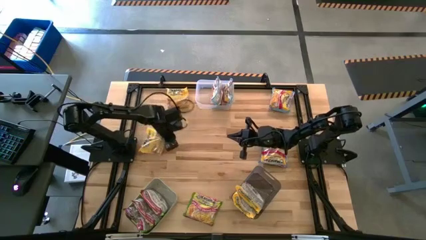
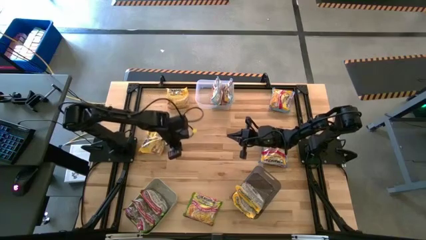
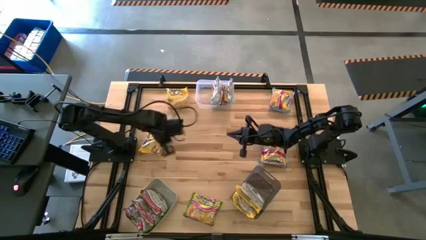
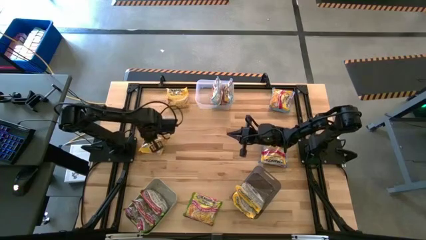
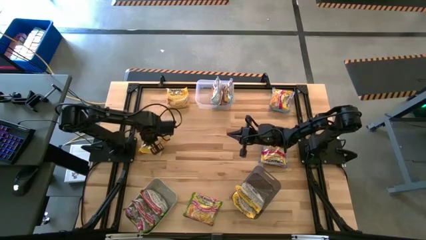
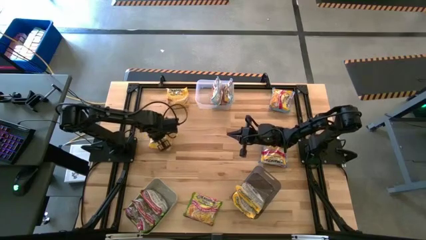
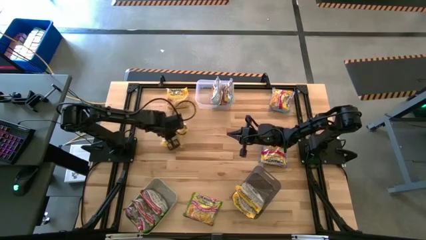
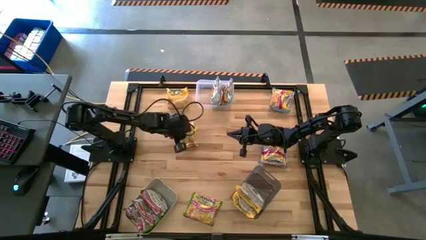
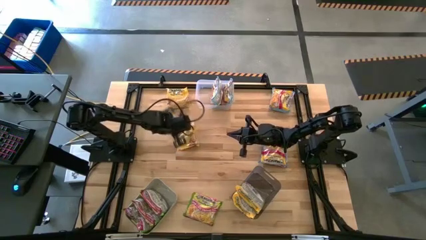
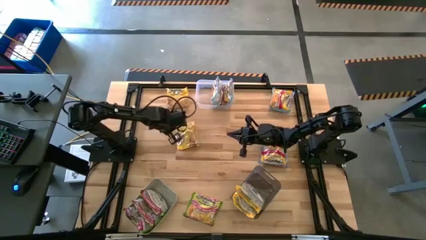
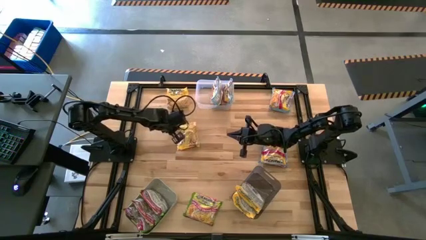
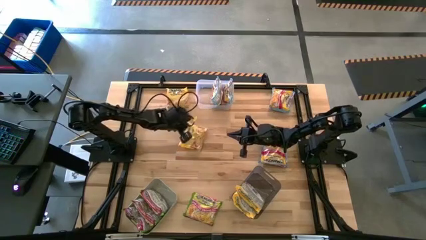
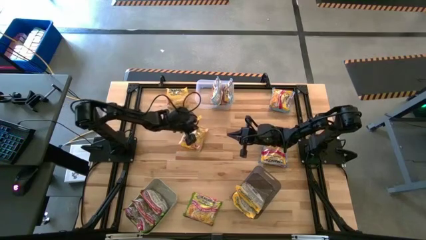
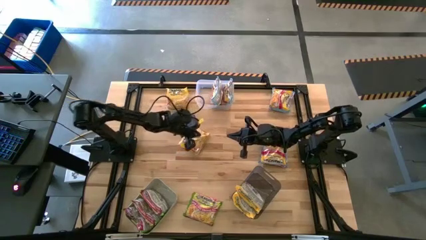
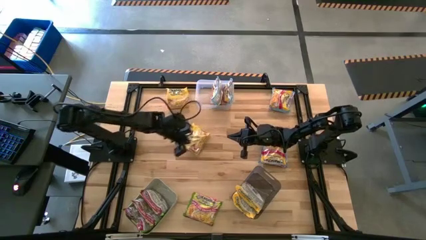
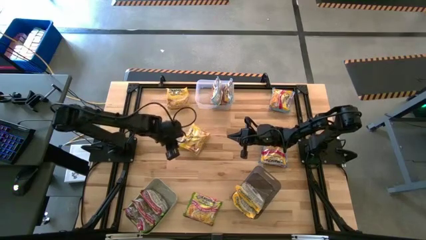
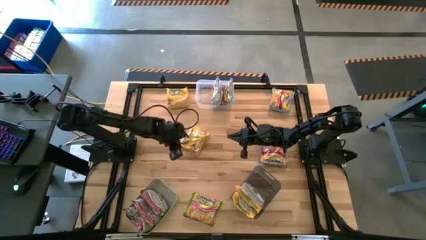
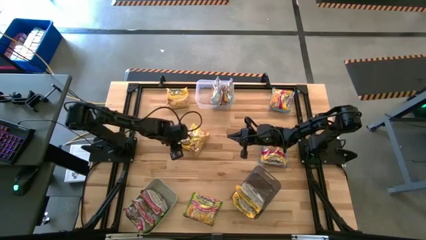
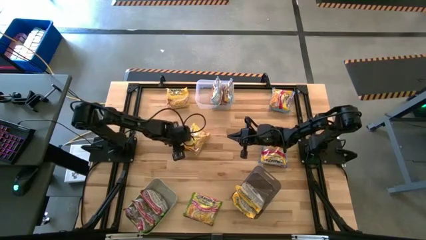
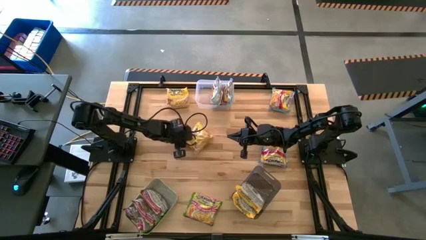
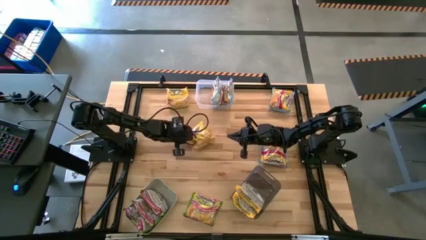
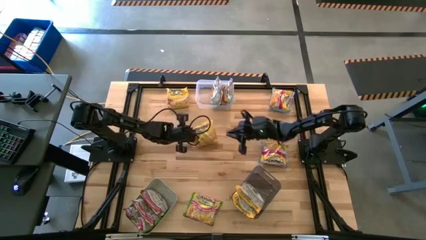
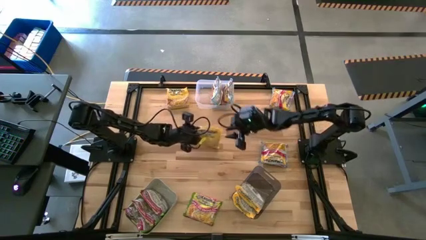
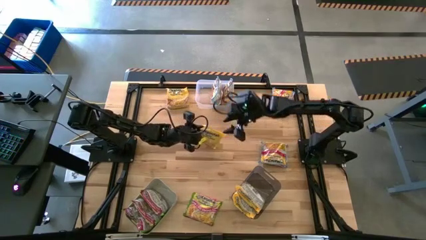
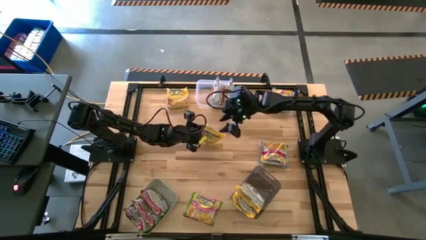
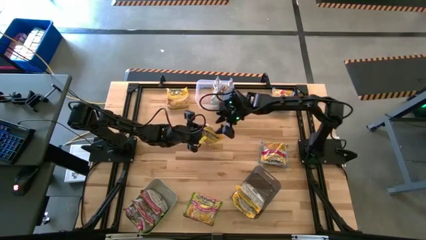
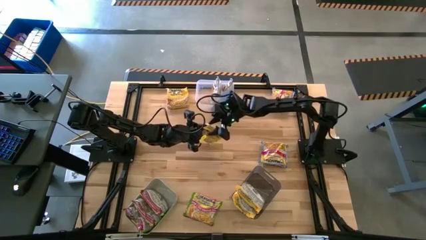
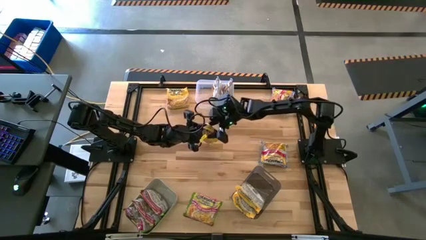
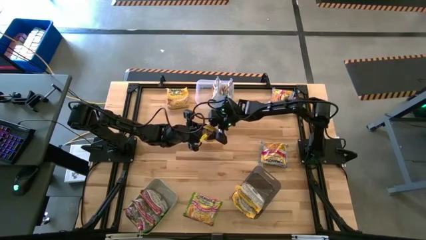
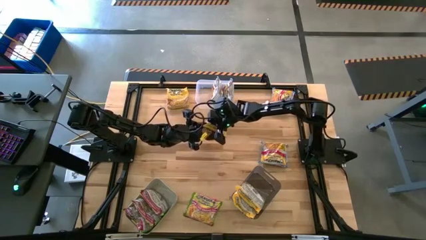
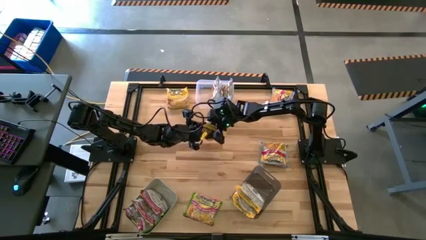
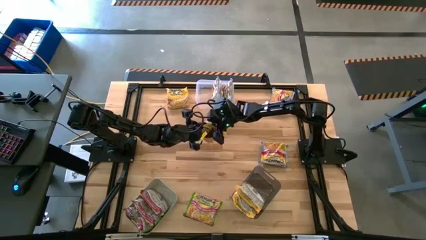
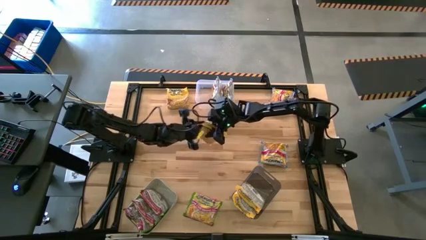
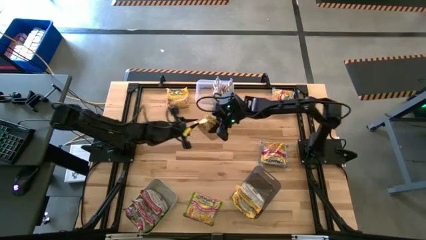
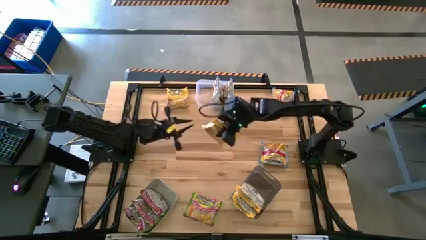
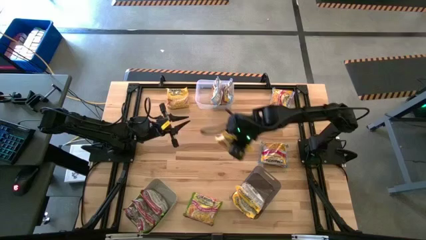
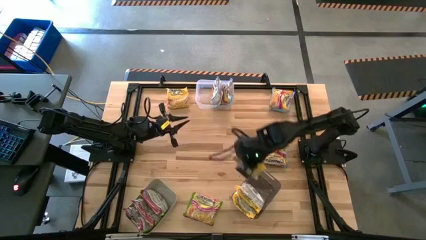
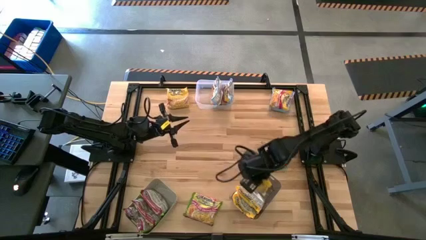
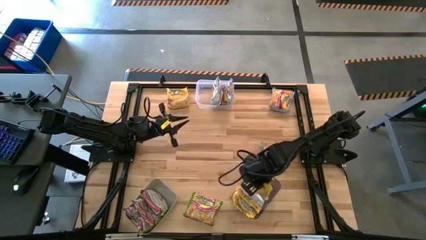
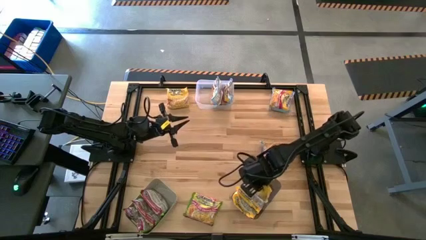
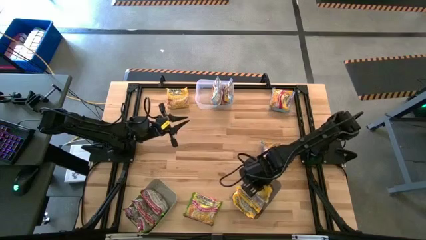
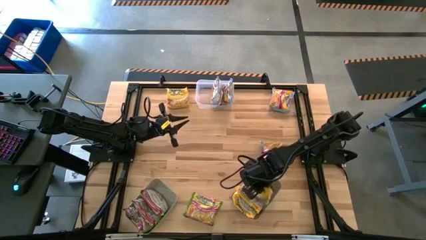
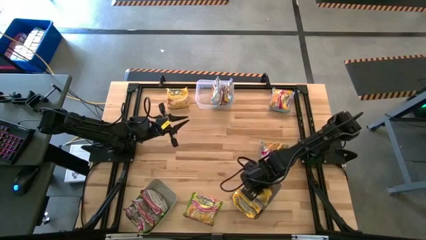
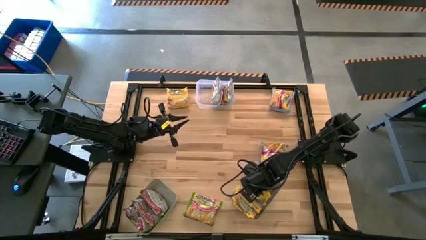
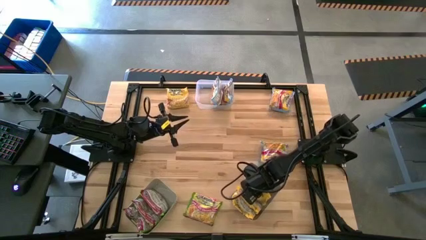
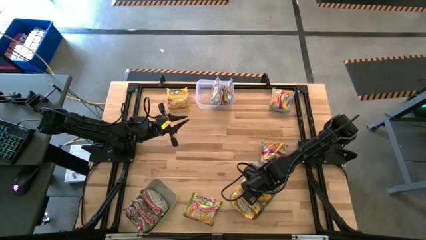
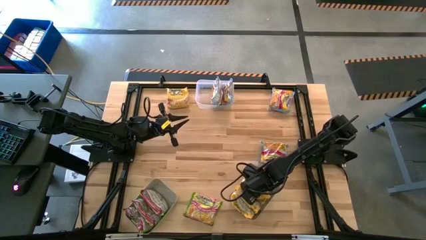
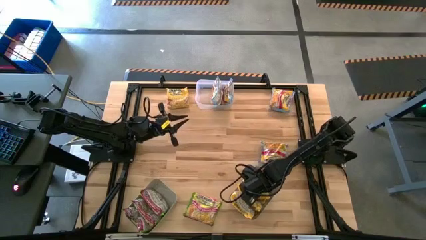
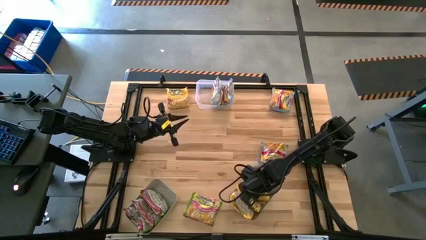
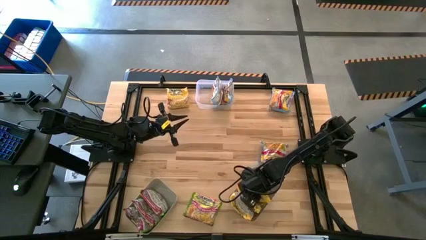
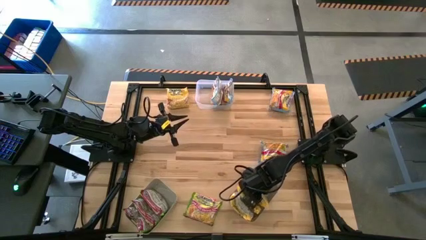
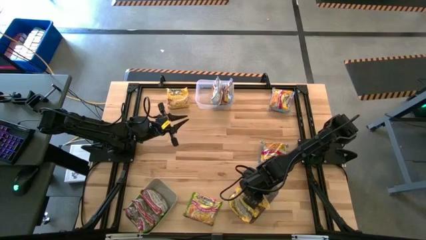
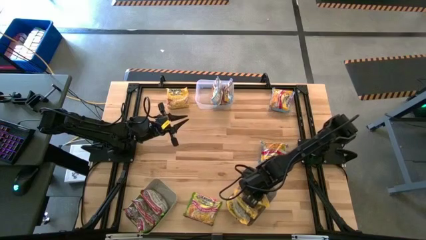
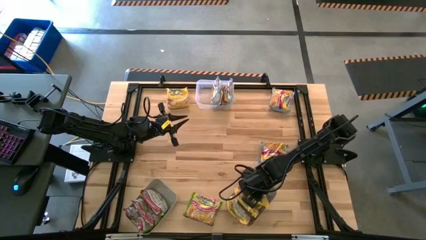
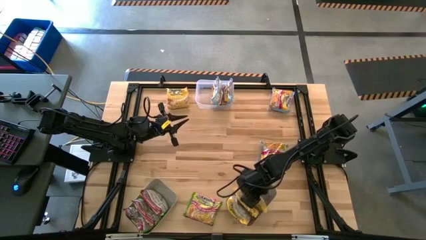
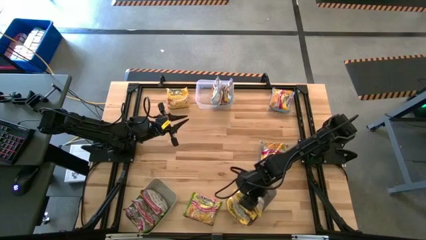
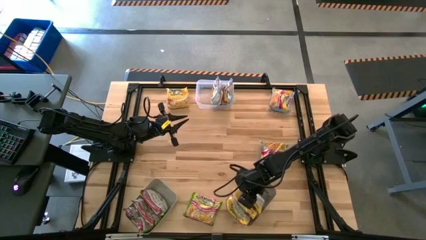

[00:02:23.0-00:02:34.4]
Task: Sort Maruchan noodles
Put the yellow noodle pack into the black bin

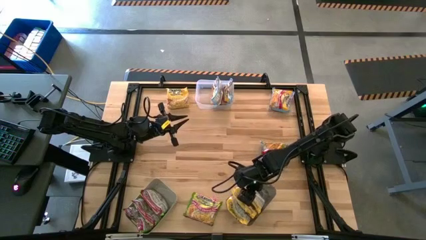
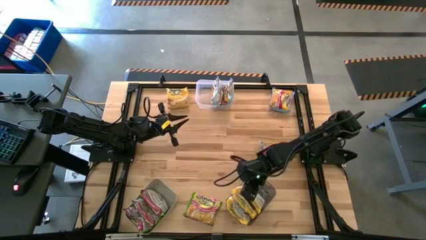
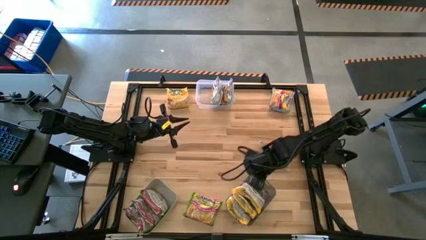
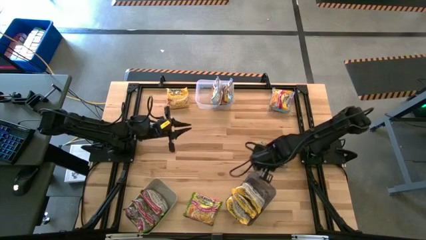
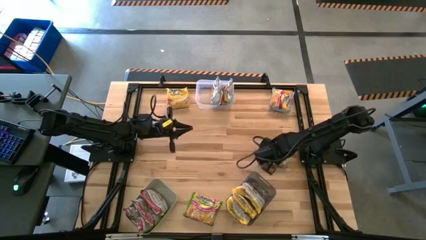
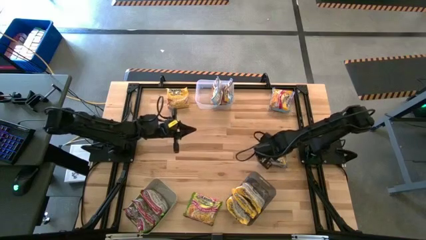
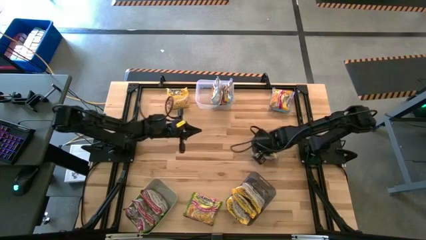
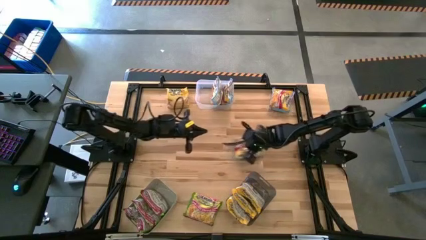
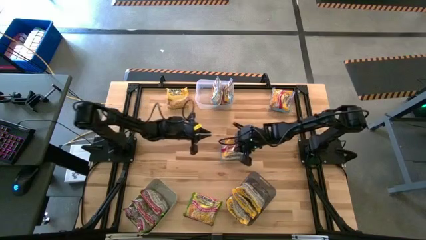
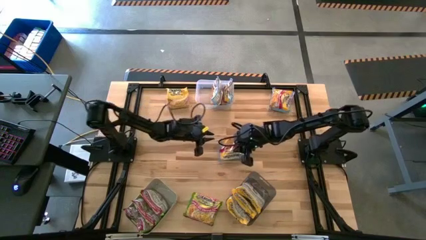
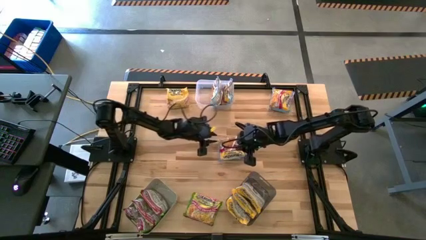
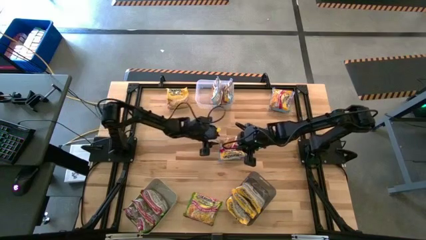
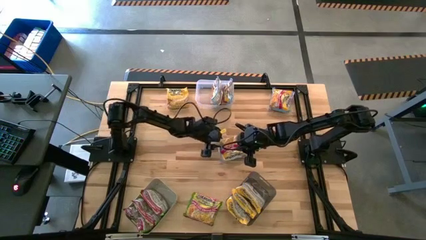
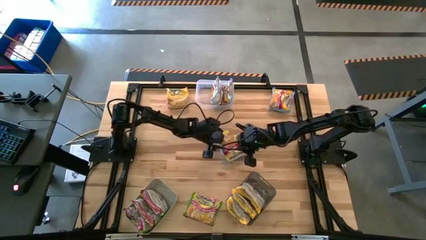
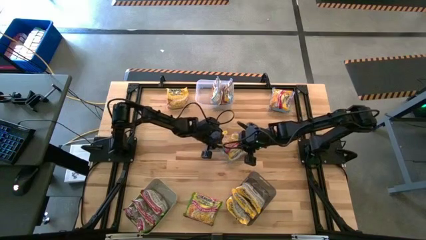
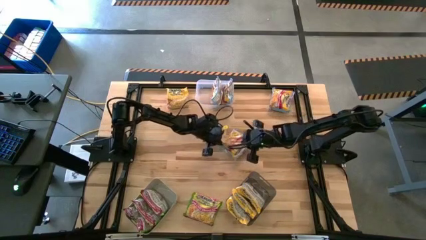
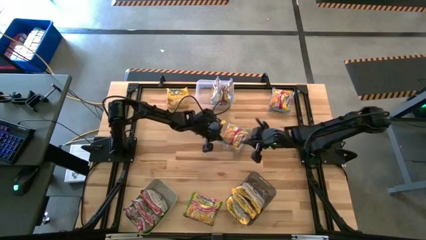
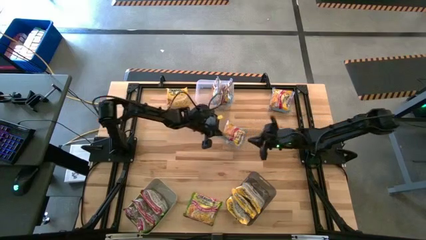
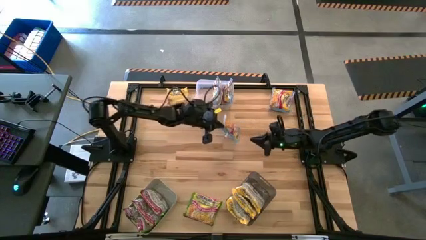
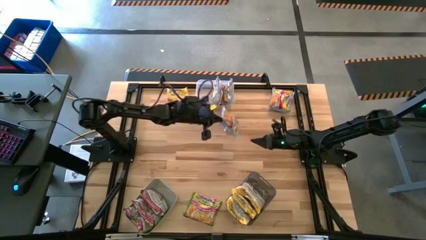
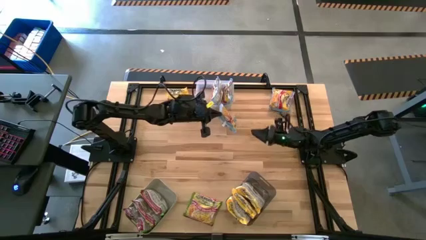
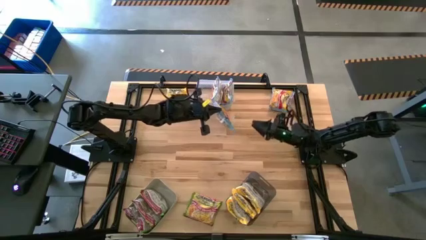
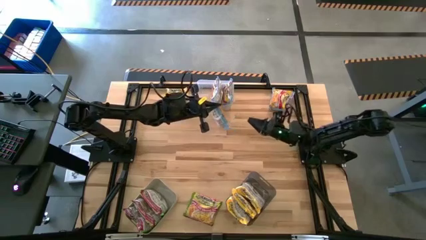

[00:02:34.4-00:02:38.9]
Put the light blue noodle pack into the transparent bin
